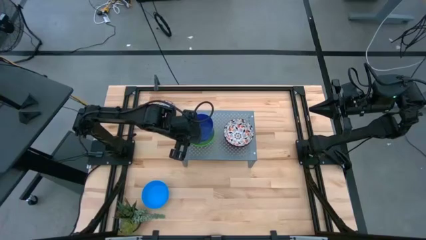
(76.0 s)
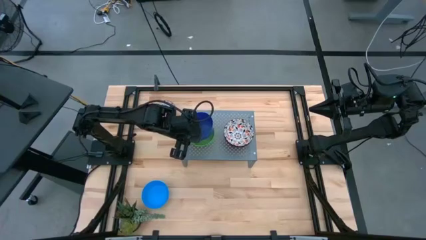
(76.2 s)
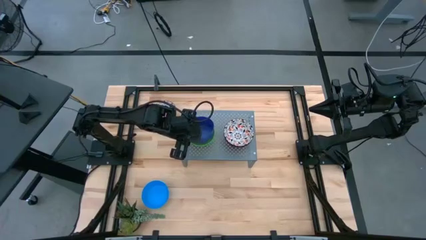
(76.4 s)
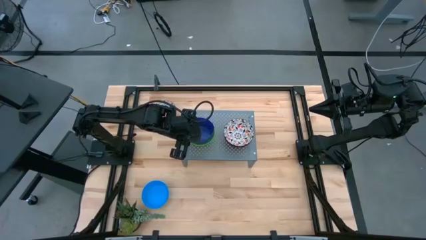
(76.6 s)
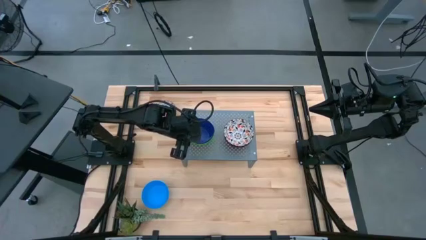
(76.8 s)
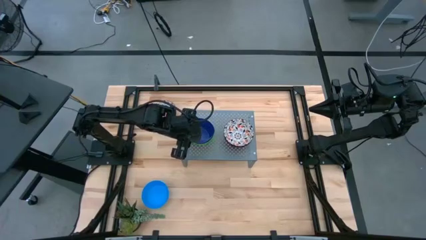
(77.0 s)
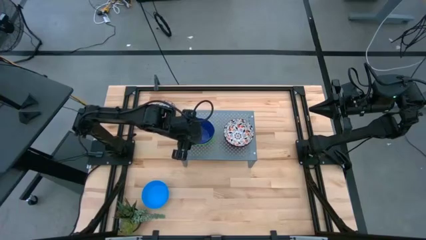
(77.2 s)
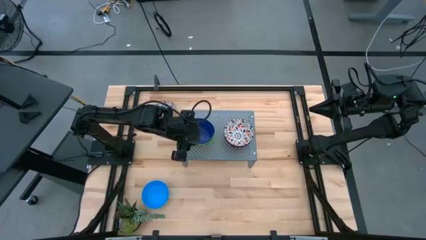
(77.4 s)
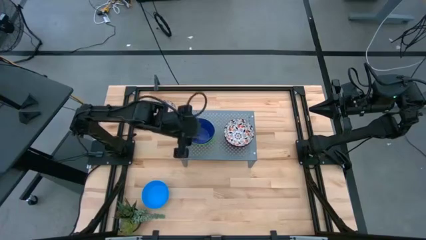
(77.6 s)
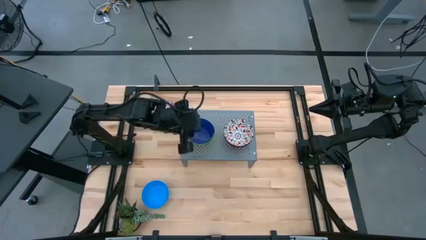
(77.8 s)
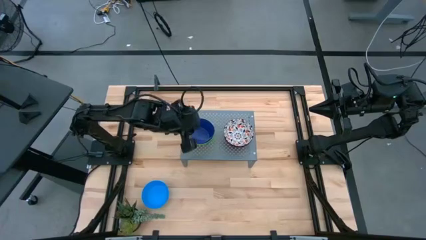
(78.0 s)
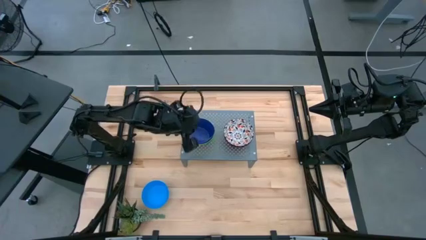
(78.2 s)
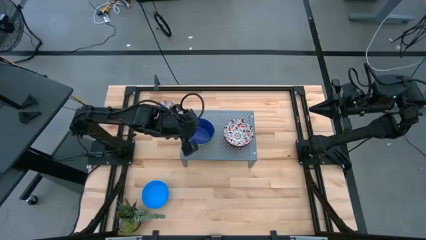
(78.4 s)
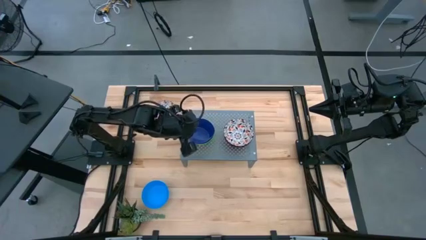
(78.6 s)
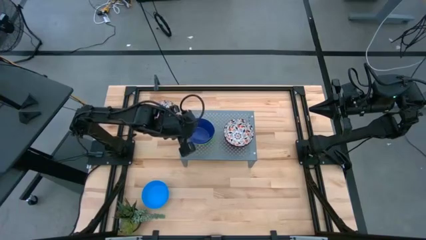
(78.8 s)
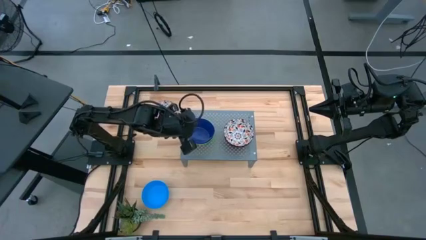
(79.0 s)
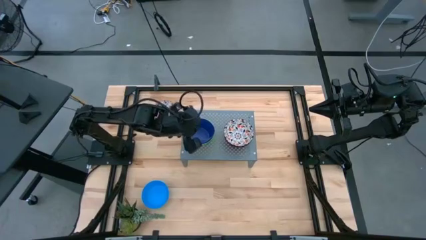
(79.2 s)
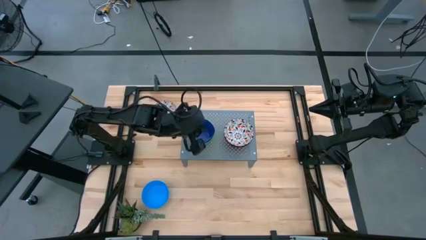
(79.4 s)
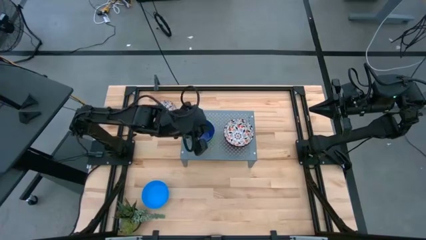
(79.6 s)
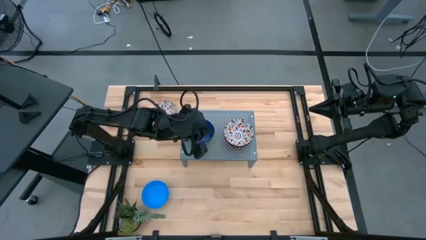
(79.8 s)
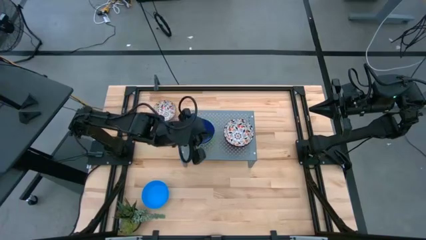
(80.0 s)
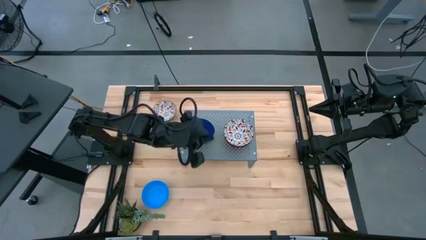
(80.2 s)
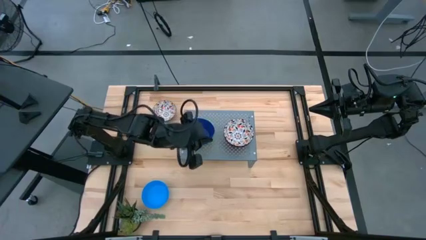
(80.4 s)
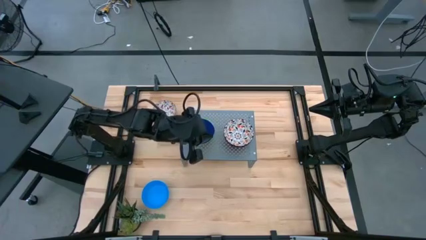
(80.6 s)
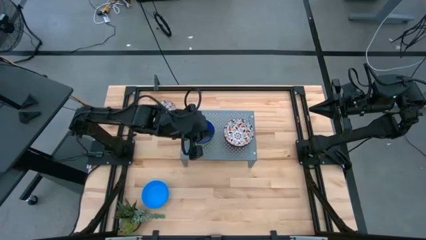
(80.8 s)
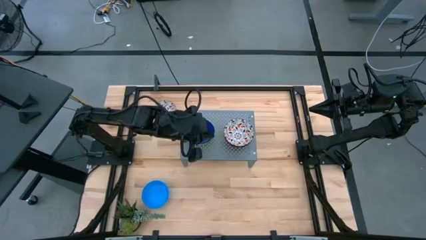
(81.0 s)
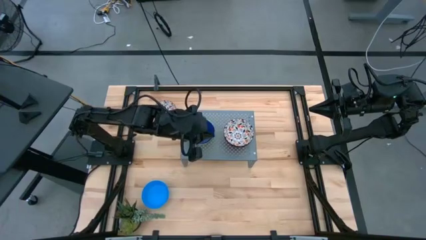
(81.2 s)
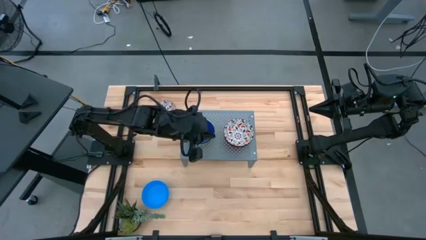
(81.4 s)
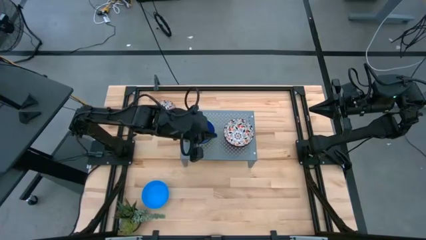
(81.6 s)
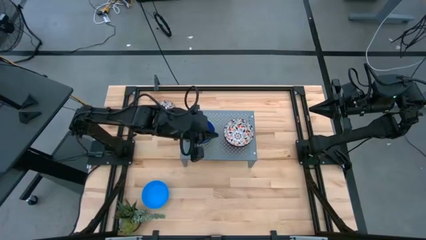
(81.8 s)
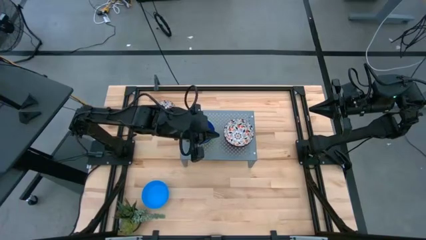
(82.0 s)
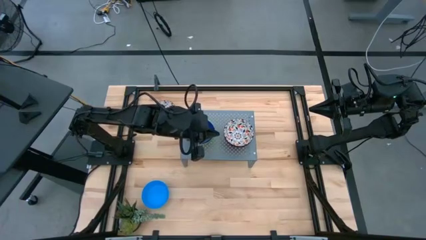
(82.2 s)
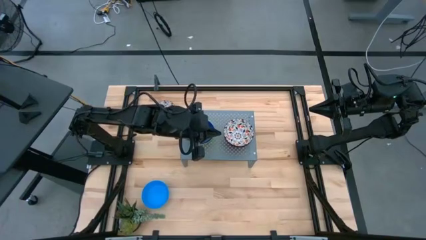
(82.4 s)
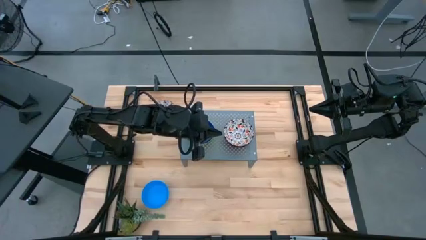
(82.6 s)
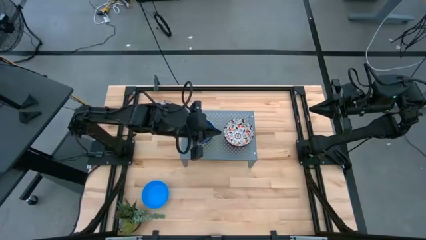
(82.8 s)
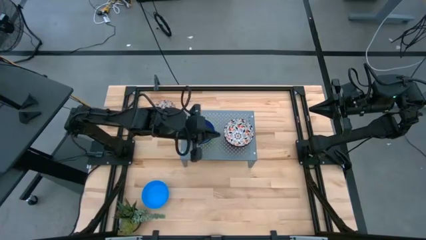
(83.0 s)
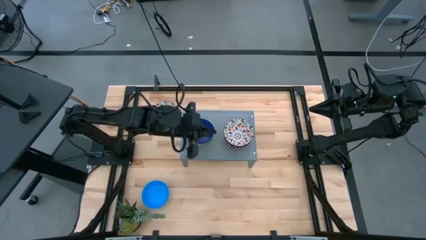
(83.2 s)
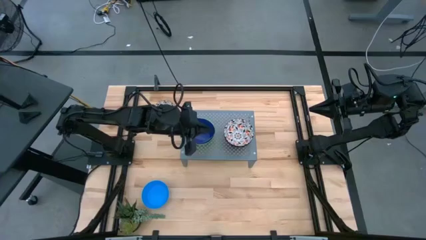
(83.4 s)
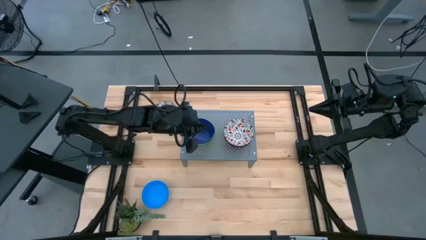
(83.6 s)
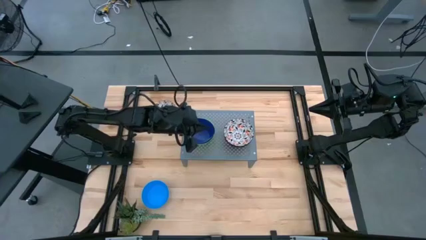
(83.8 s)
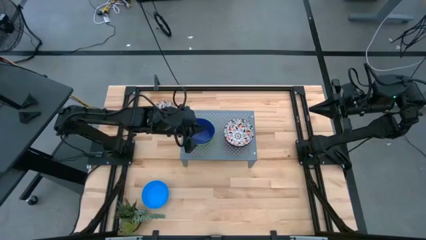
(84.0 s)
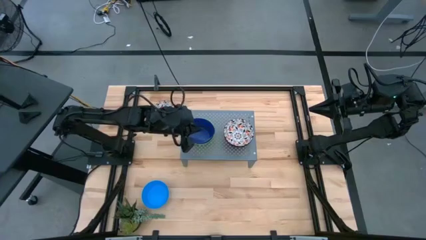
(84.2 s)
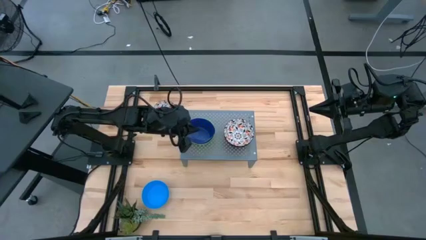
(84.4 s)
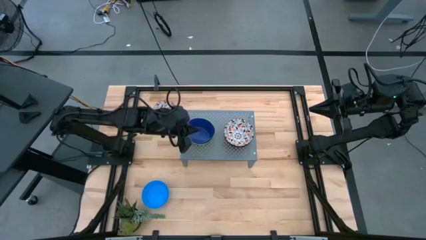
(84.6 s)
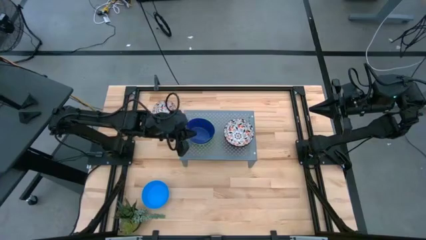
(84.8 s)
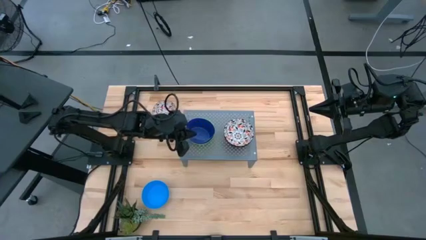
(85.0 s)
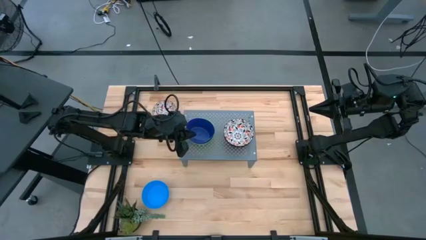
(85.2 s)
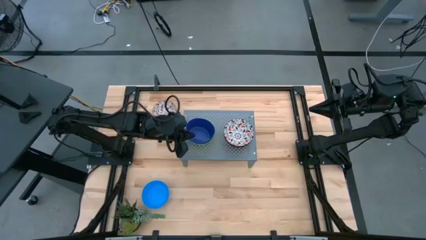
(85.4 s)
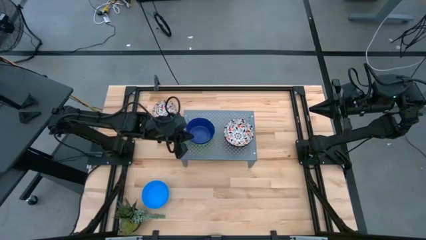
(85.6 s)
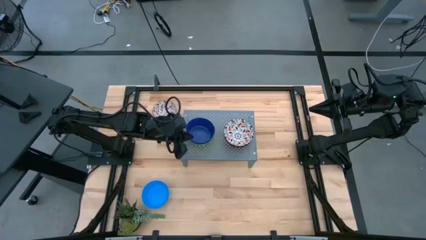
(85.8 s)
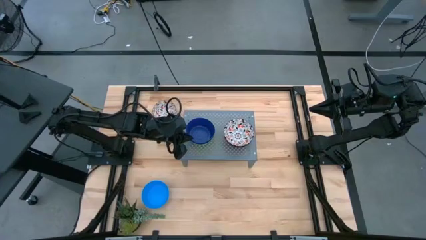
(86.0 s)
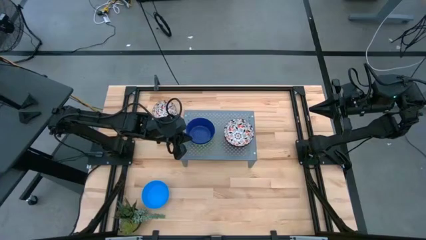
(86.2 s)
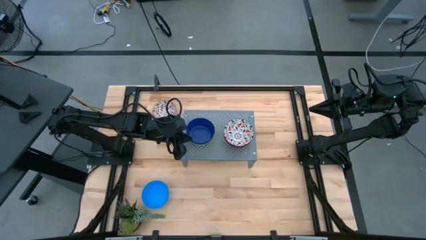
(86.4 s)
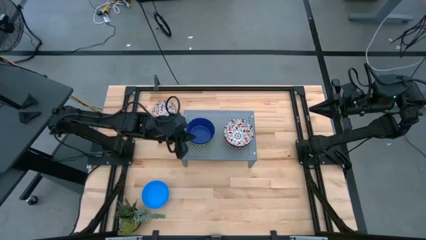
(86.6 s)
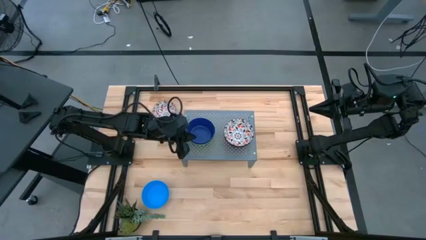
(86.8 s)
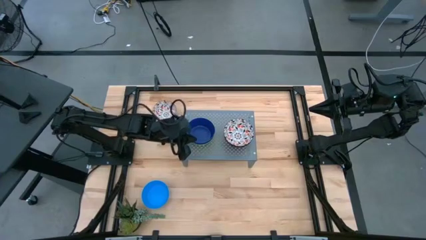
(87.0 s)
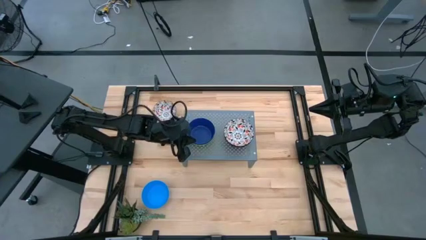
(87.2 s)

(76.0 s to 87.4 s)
Task: Pick & Place Mini bowls
Stack the blue bowl on top of the green bowl on the shelf

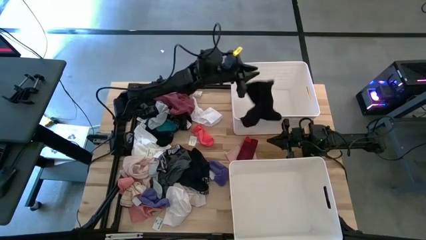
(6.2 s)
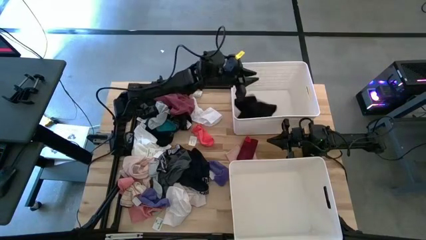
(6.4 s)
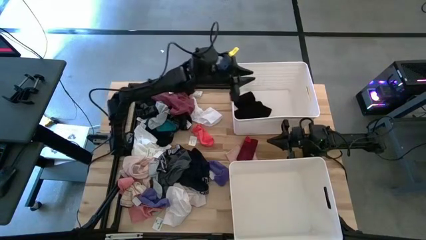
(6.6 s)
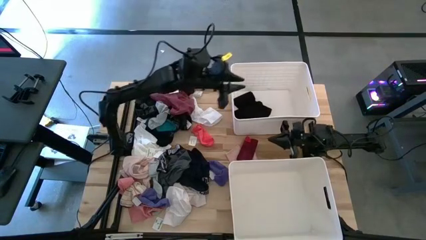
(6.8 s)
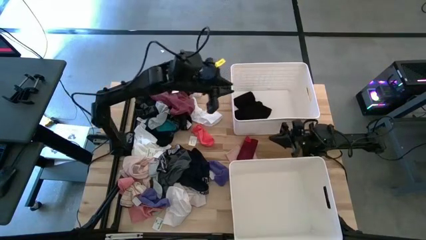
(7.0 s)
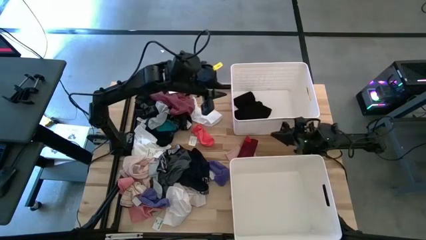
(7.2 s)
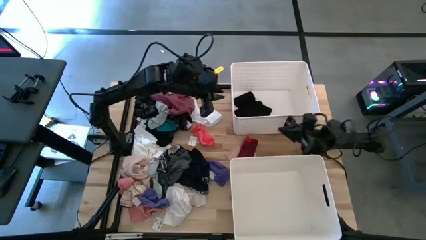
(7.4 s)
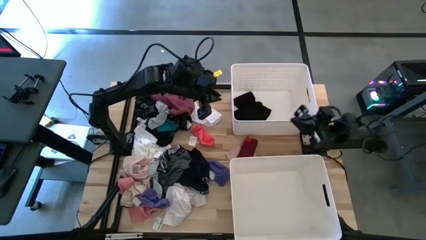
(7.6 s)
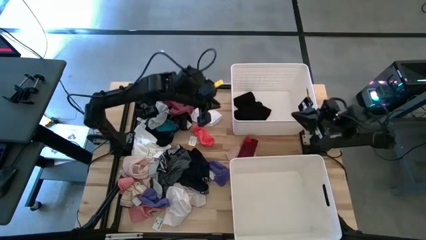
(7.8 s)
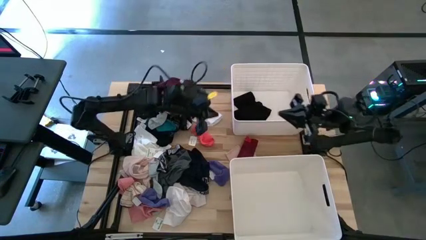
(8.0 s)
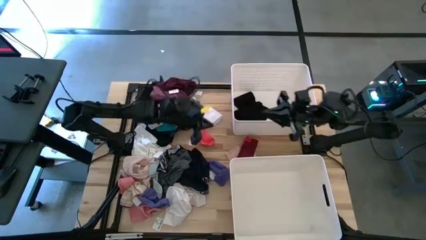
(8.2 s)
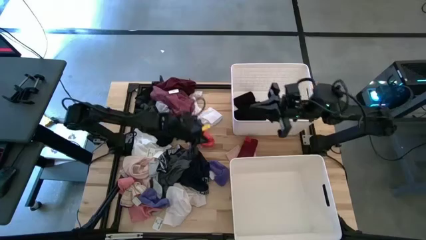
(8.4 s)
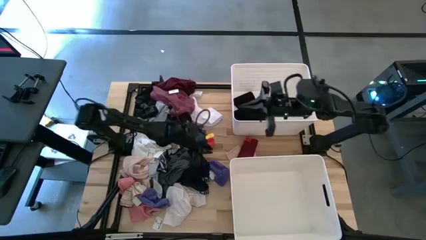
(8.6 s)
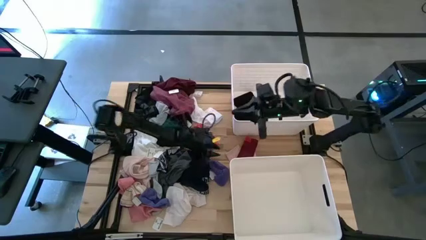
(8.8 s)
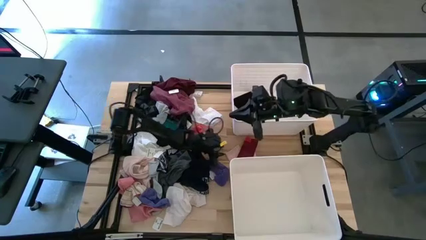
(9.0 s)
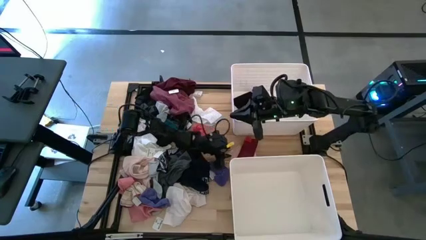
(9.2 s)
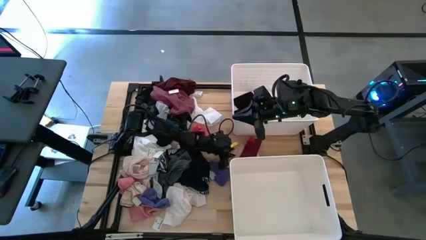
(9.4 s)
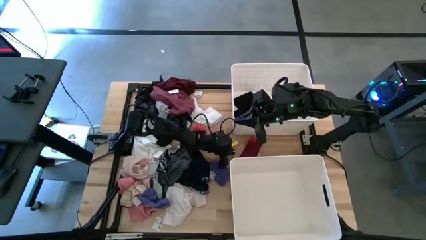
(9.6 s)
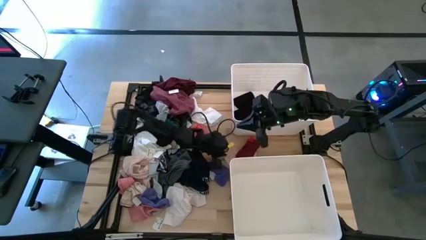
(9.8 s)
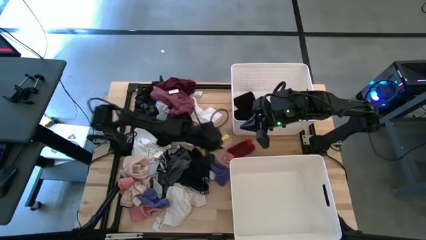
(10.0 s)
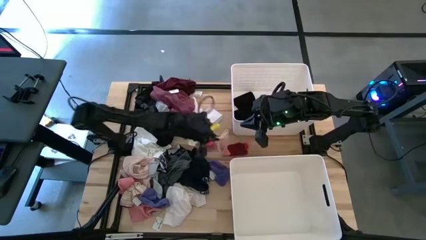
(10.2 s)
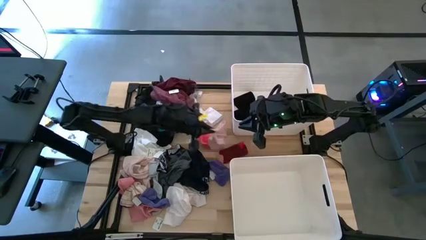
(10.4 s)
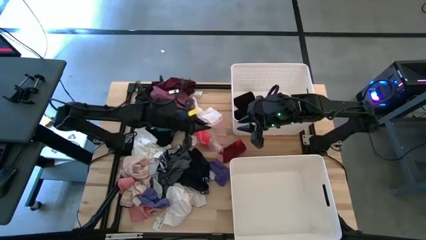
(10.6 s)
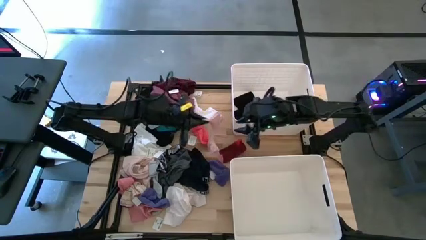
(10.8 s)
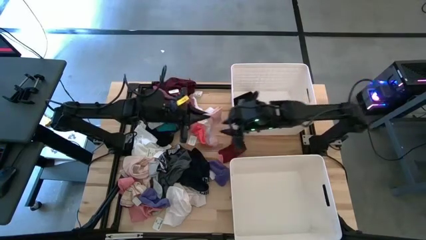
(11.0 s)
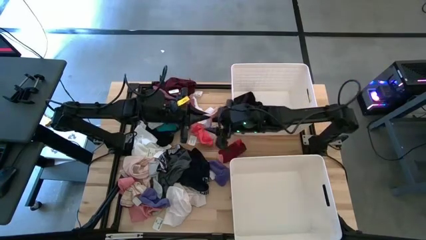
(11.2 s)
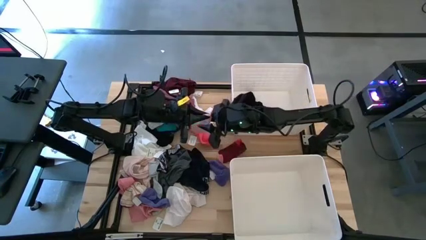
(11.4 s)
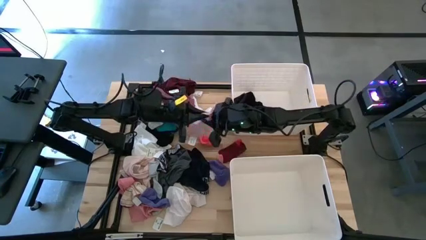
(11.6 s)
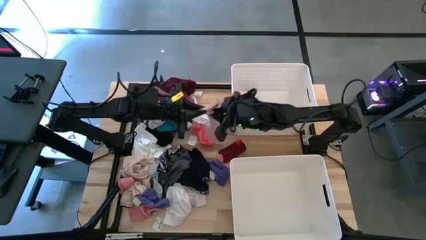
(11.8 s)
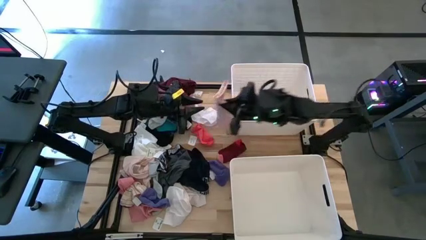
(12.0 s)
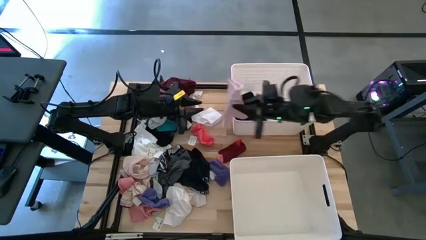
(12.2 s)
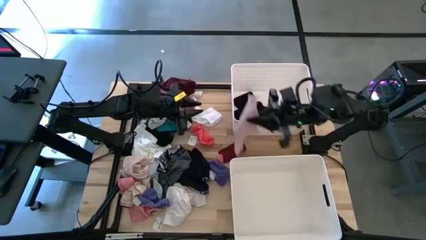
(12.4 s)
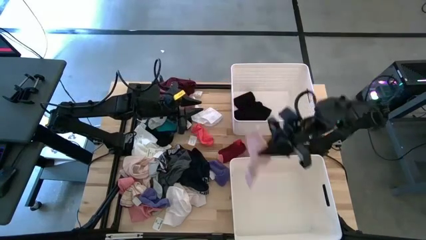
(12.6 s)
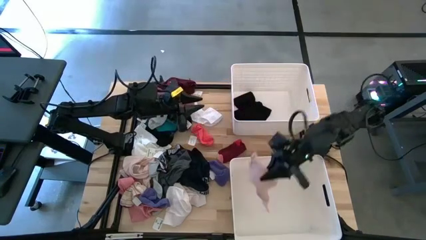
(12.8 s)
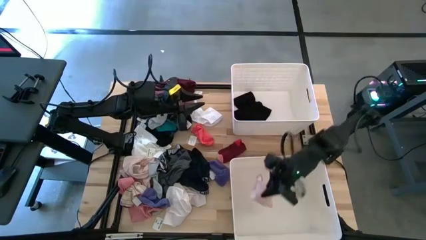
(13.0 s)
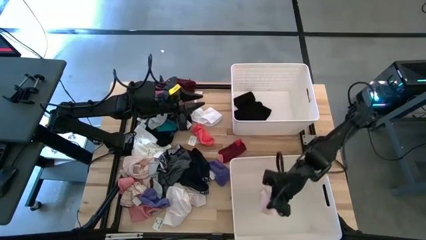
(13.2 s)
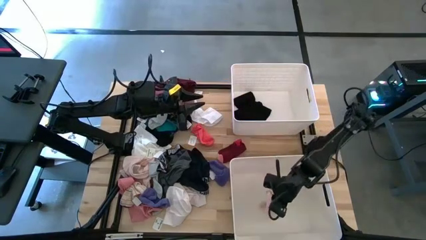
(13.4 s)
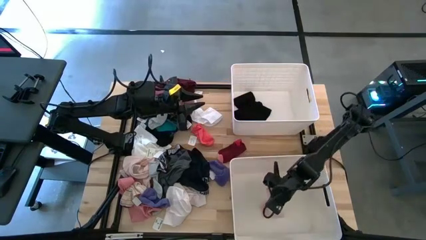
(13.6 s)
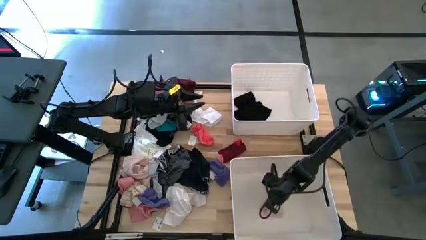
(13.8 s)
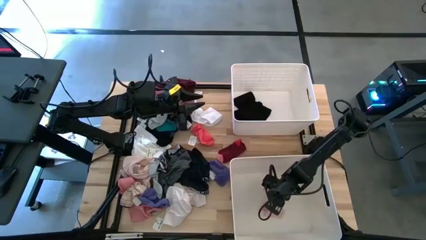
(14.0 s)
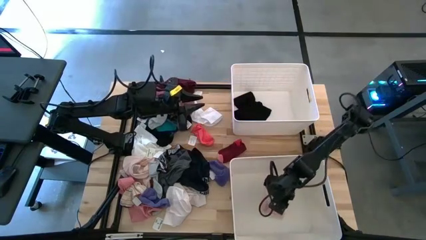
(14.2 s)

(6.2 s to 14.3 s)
Task: Sort clothes
Put the pink sock into the bottom bin
